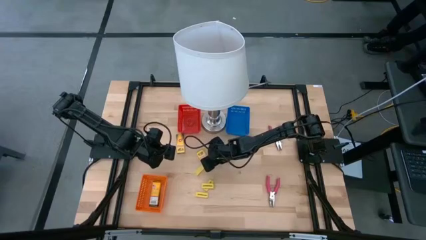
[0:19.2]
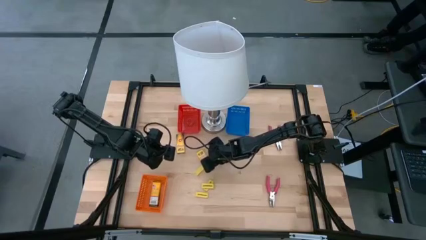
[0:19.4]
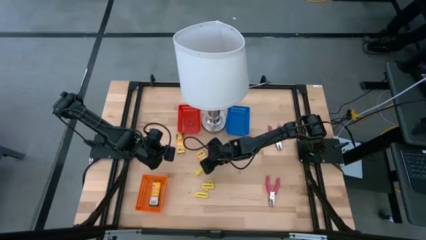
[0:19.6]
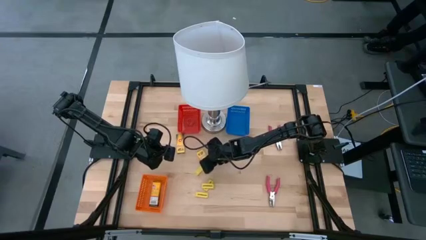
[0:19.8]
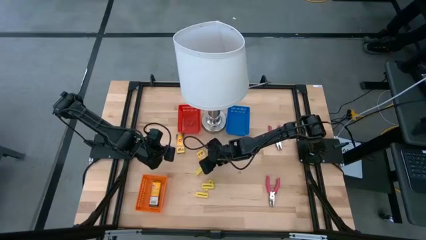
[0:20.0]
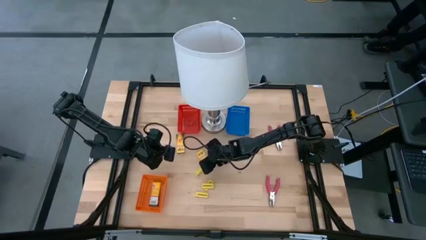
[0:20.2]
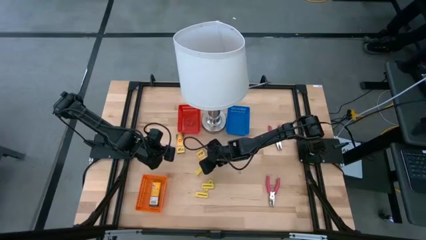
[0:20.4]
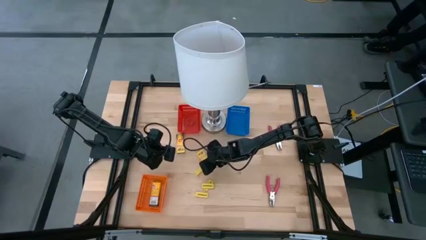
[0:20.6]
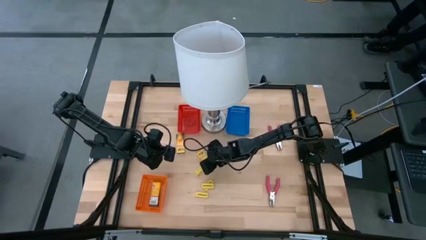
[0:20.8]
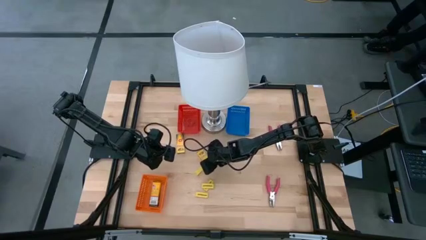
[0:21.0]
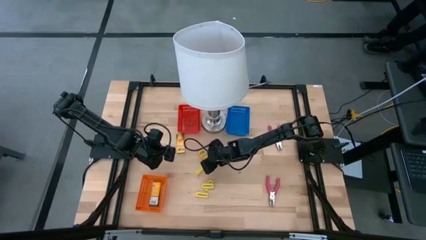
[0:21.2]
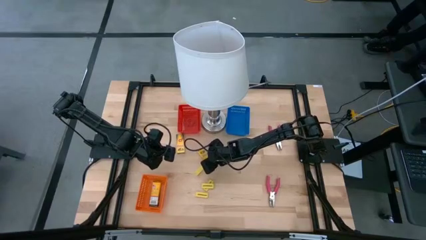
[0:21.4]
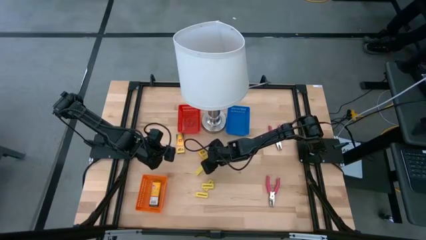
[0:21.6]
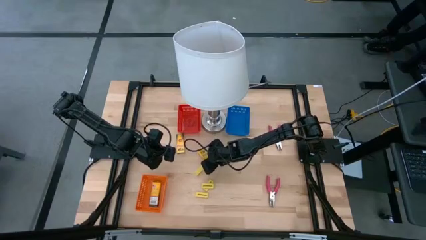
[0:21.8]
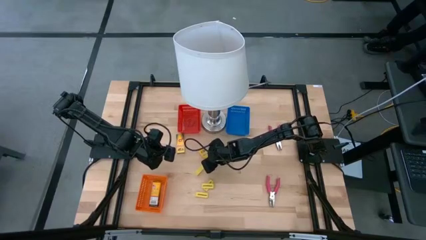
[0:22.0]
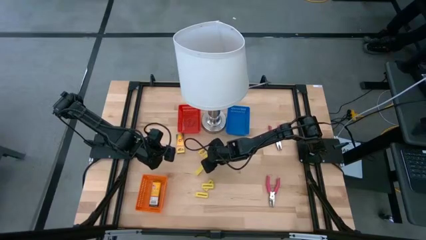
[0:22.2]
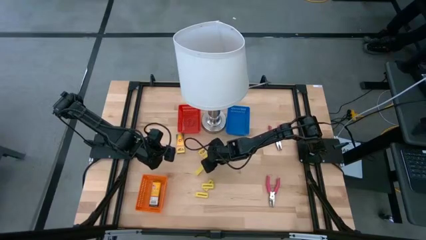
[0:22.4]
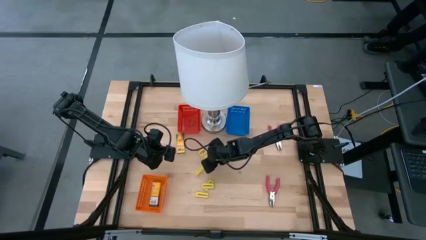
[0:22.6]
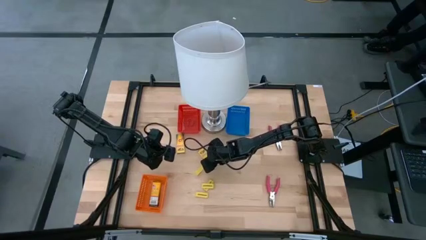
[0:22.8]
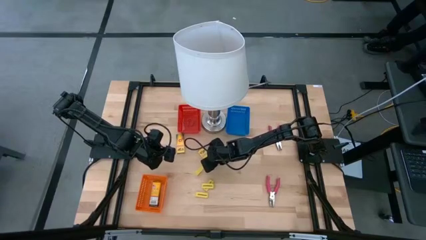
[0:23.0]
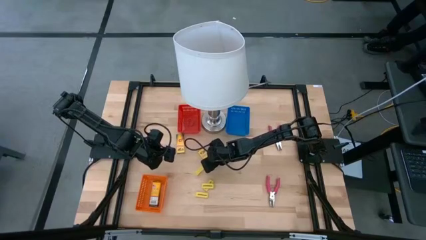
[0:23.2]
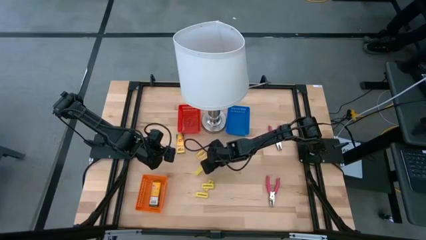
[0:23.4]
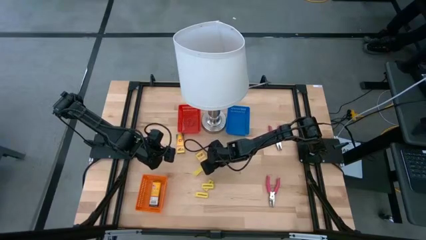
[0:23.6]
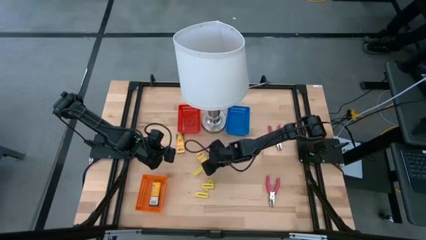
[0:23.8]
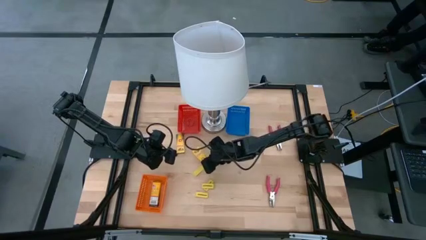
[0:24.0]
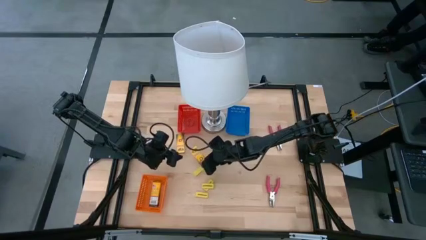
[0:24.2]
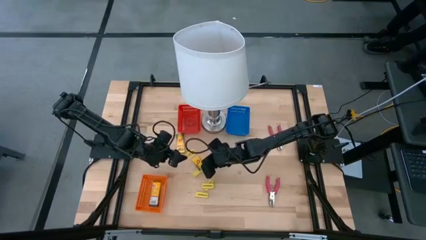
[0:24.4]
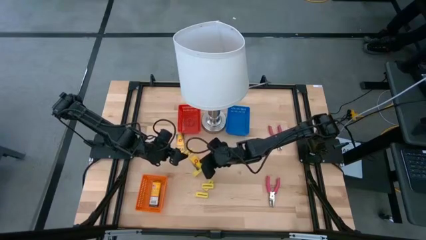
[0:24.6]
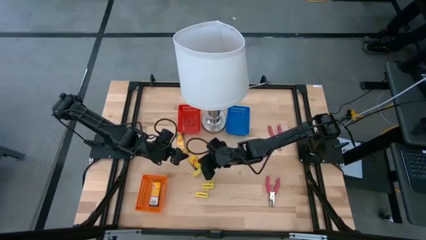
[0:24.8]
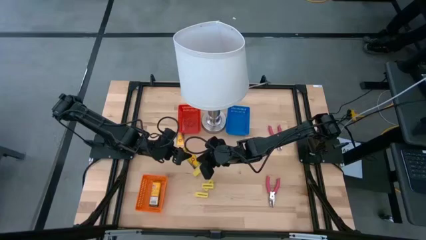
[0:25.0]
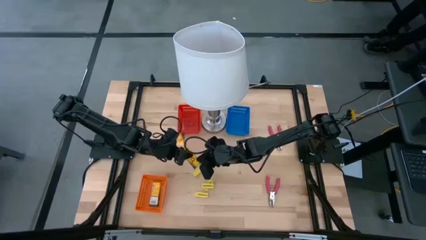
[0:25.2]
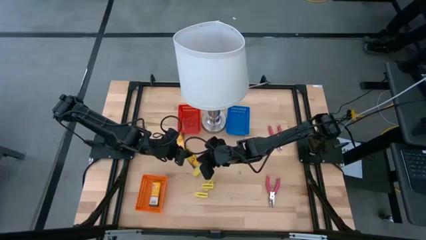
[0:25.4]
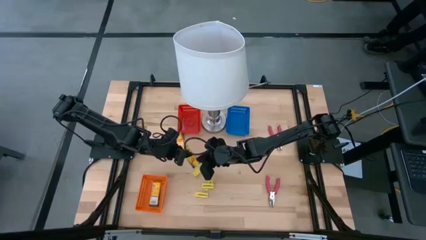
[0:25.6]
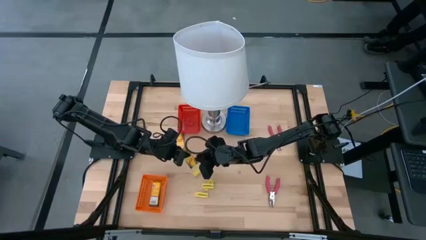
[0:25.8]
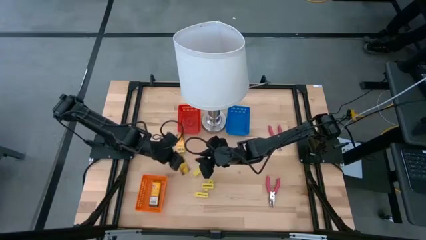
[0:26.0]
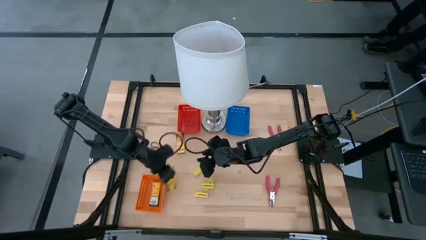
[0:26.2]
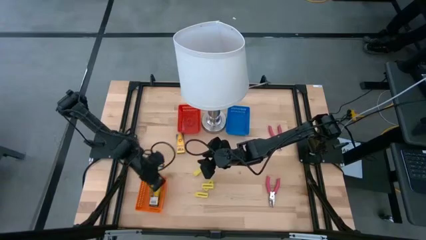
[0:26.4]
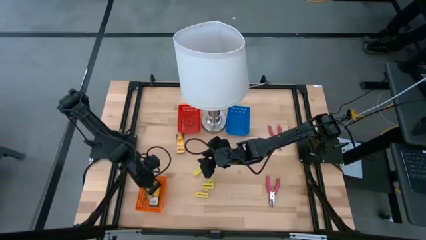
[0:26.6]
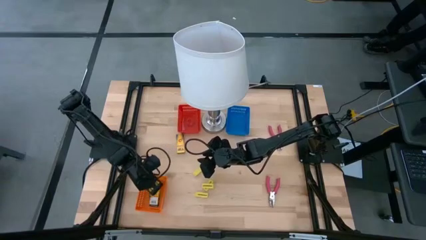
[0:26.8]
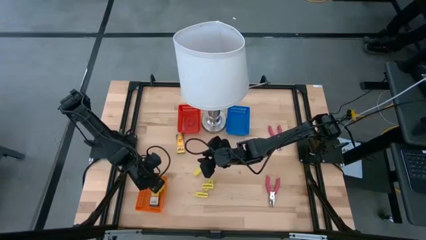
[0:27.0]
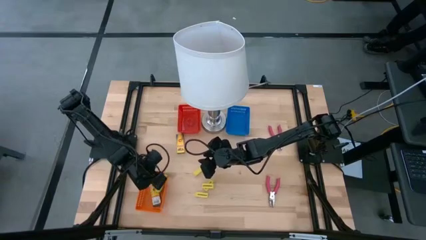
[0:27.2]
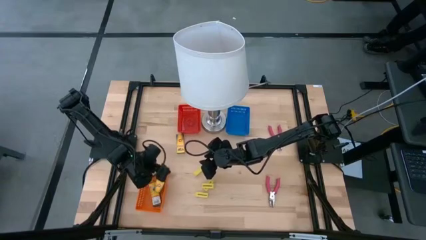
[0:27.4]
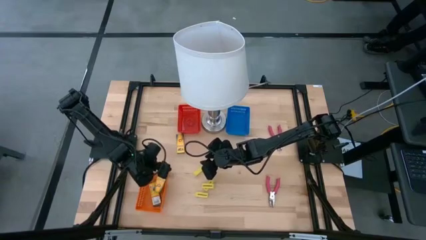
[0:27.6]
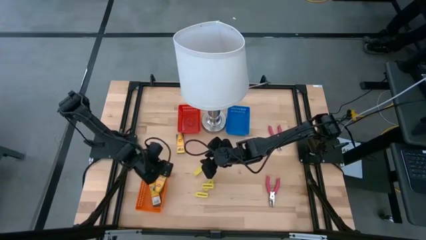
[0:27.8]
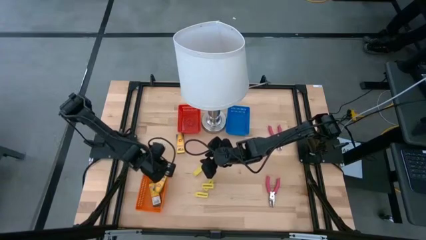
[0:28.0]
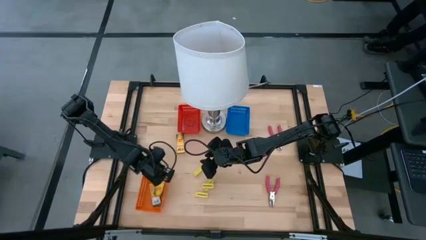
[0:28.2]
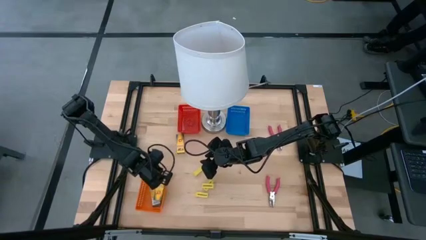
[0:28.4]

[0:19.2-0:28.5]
Task: Pick & Place School Supplies
Put the yellow crayon box into the orange basket

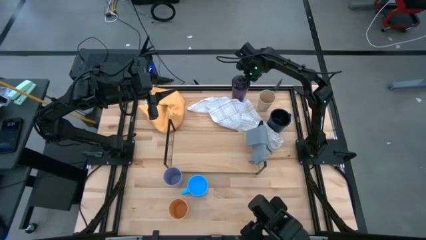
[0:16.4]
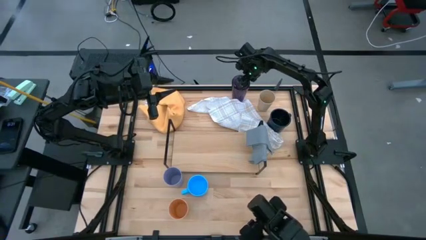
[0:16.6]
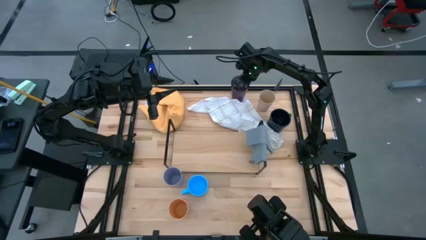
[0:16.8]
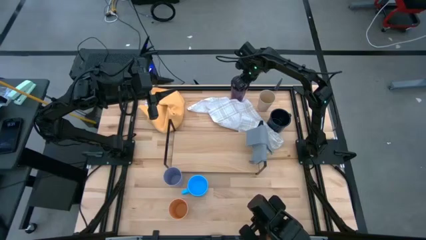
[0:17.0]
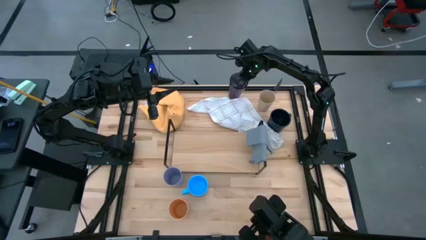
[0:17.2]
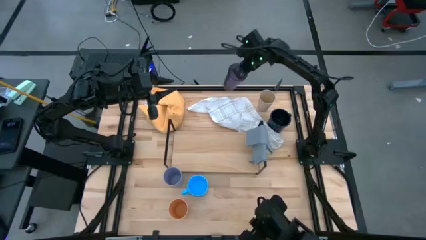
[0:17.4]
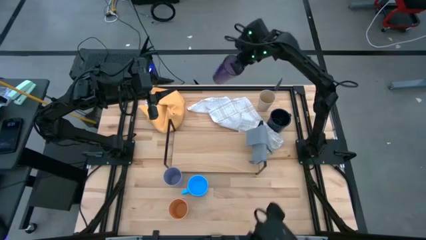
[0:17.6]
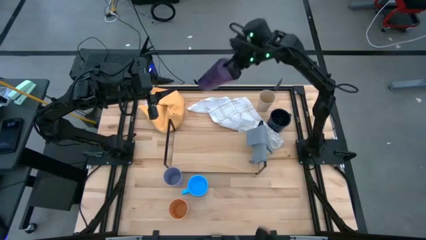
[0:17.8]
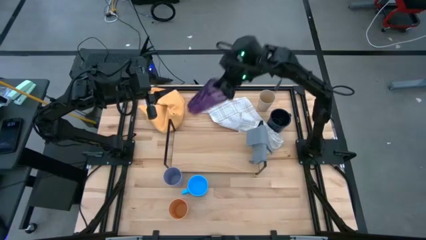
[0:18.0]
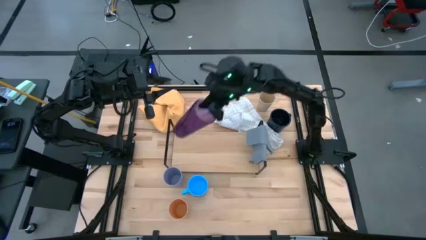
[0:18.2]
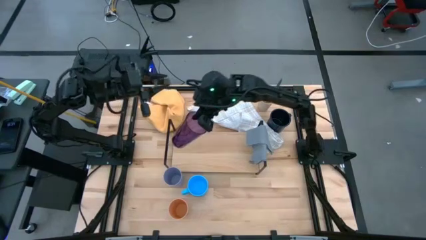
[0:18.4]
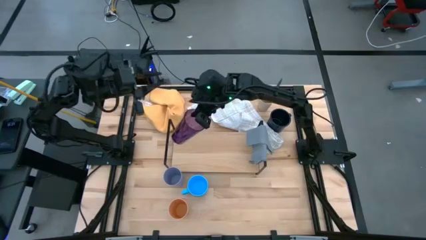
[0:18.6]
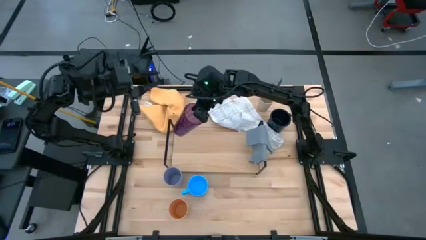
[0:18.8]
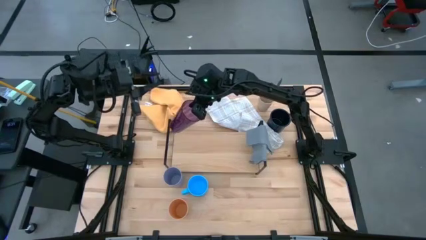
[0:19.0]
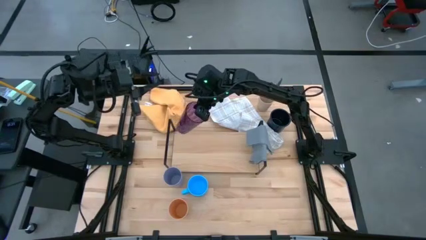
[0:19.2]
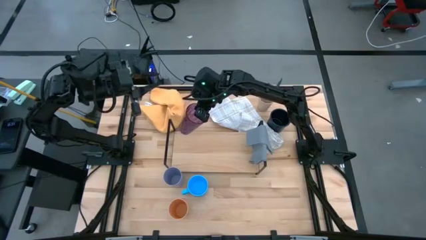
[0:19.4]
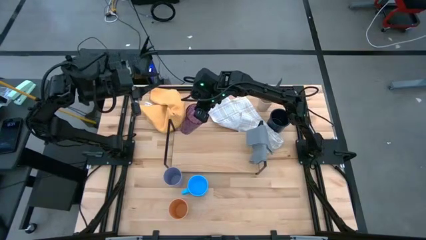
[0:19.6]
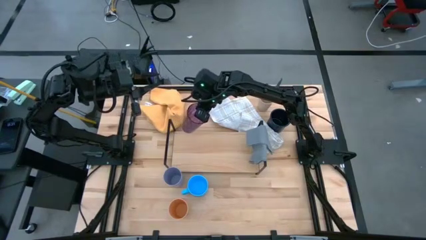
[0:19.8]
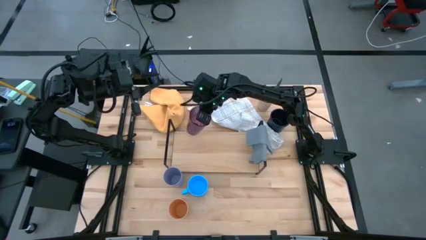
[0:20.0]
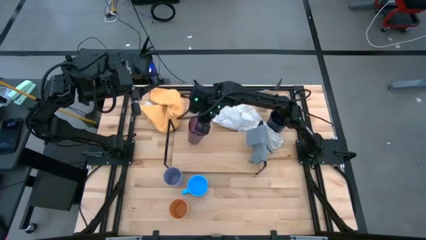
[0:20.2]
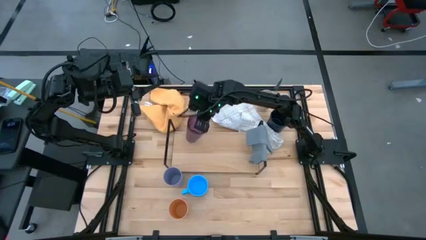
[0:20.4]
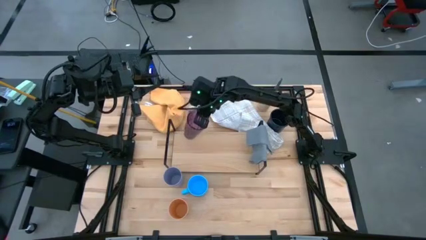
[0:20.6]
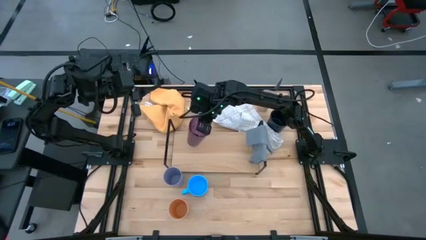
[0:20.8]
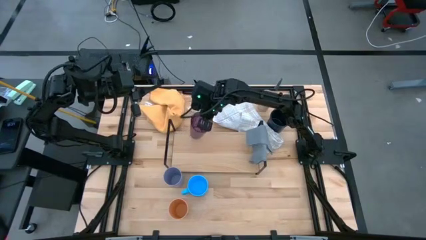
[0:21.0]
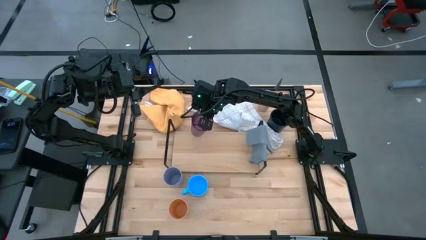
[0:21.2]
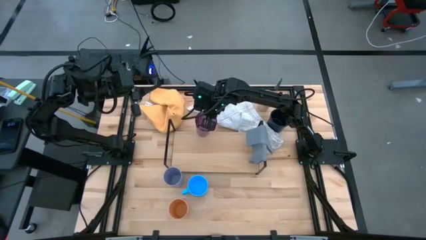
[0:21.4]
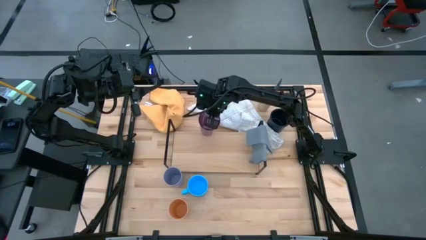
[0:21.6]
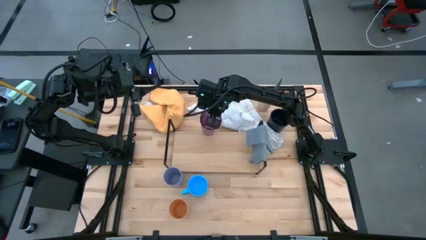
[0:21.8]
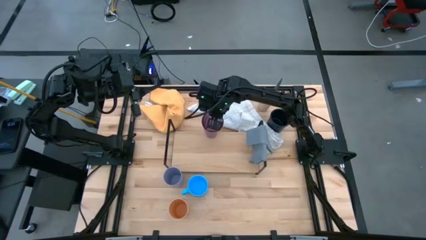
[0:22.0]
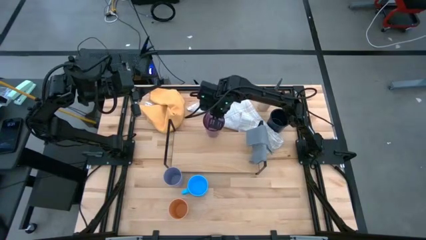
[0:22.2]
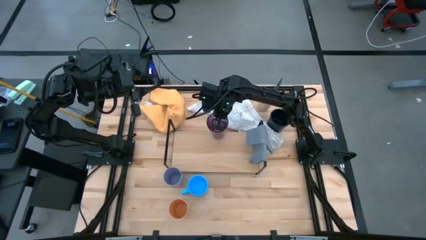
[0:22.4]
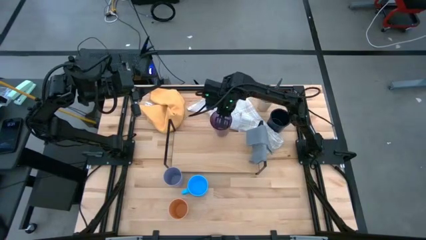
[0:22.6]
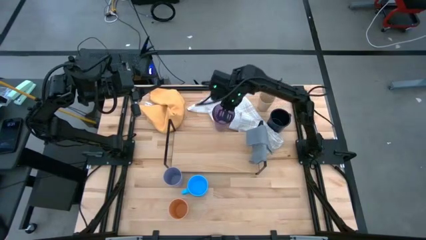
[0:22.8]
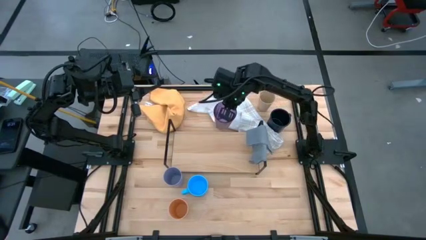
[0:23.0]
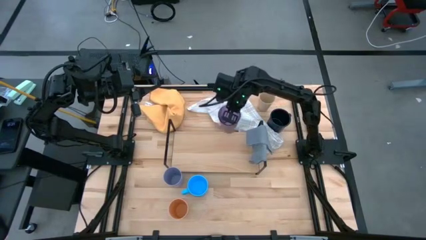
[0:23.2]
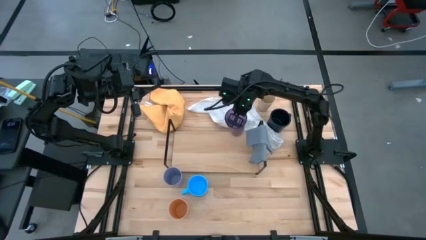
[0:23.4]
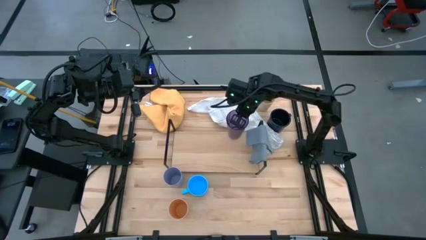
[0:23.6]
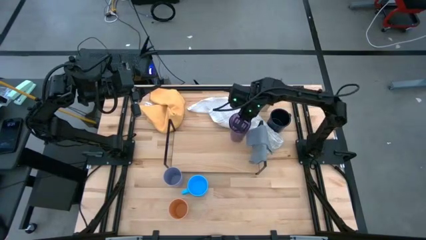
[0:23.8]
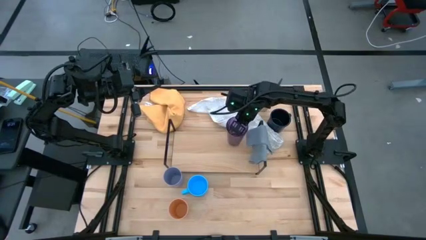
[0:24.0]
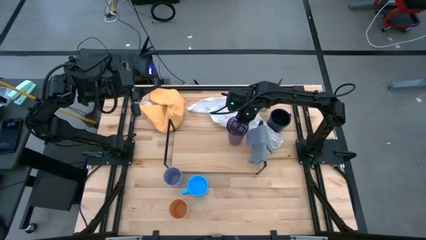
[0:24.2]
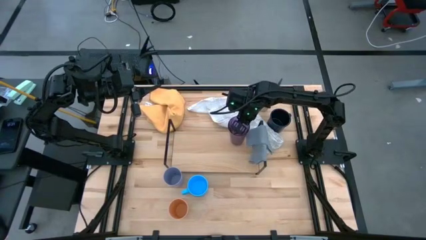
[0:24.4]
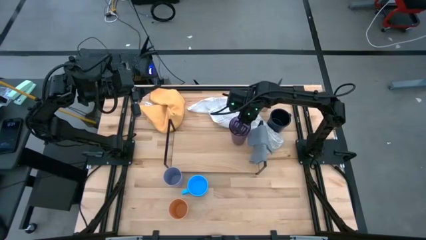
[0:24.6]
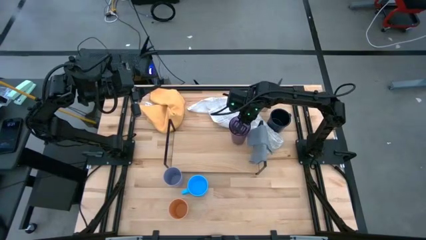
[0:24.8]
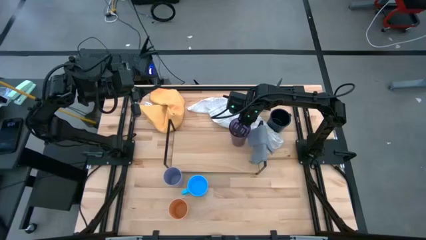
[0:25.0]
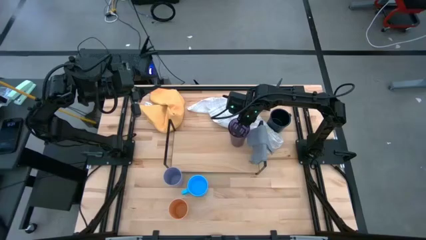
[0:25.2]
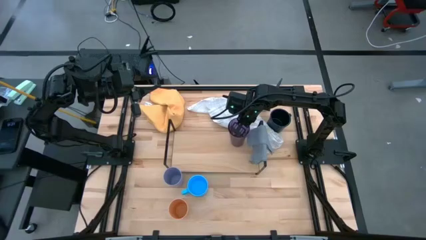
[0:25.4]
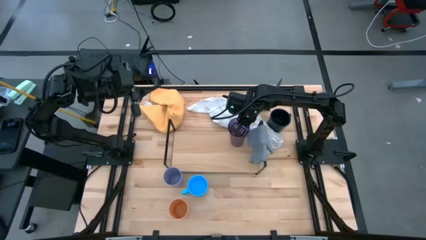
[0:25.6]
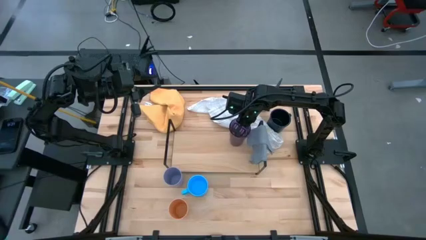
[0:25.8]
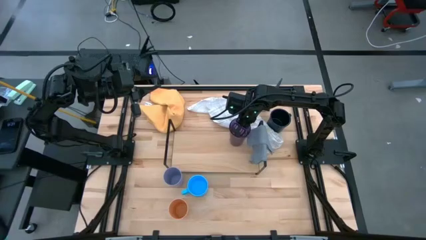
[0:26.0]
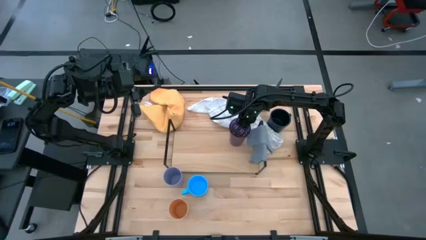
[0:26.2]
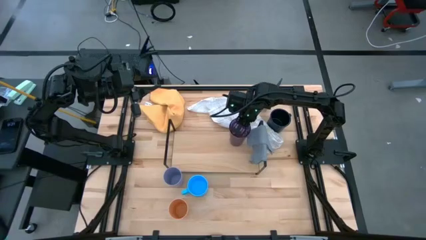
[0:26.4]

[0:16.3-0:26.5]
Task: Stack small to large cups/mugs on shelf
Put the purple cup on the shelf
